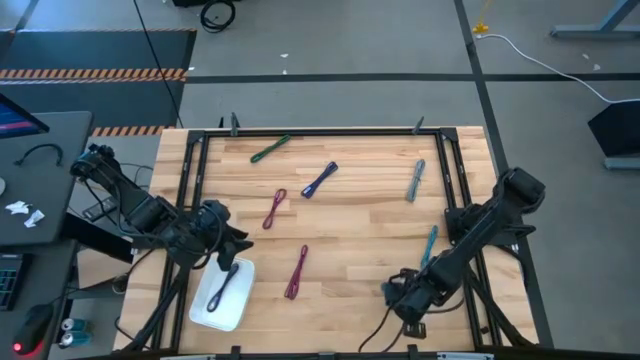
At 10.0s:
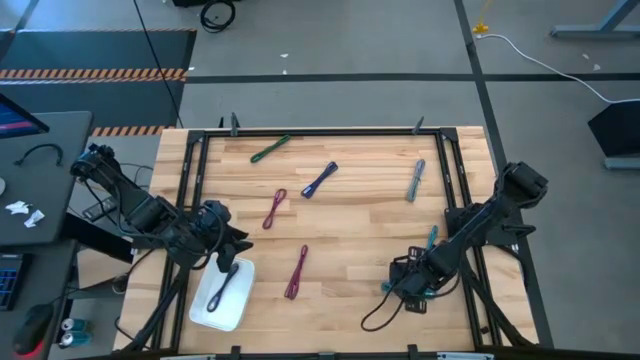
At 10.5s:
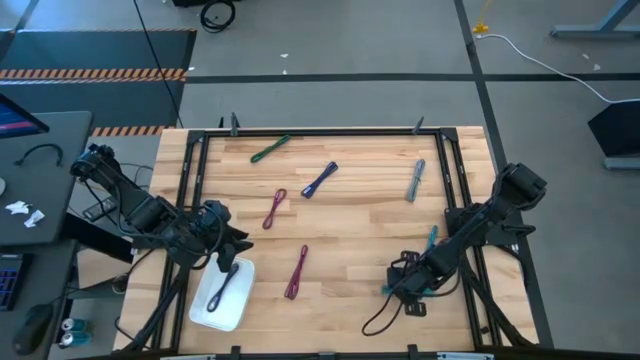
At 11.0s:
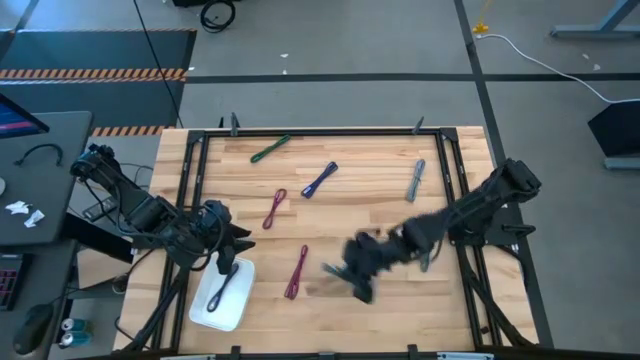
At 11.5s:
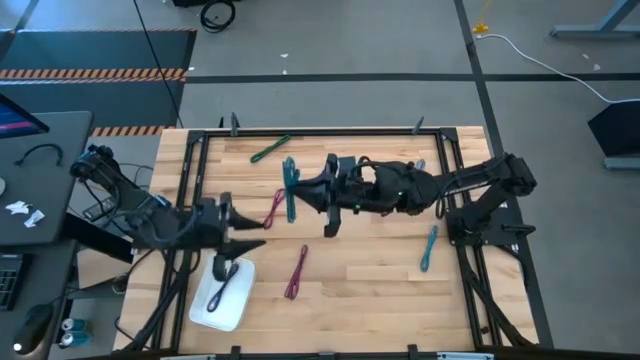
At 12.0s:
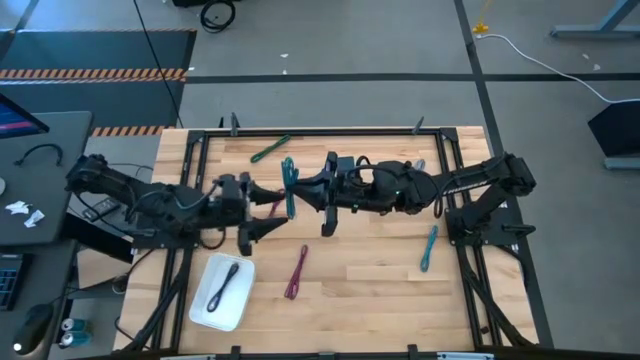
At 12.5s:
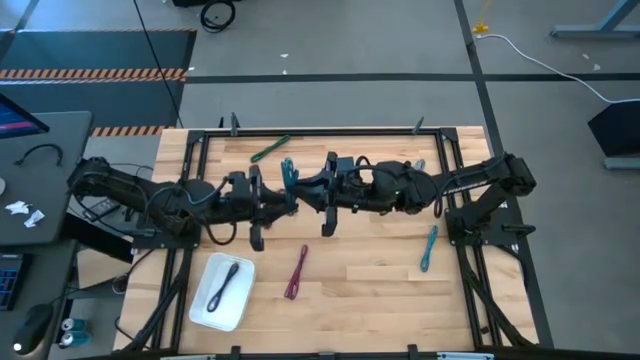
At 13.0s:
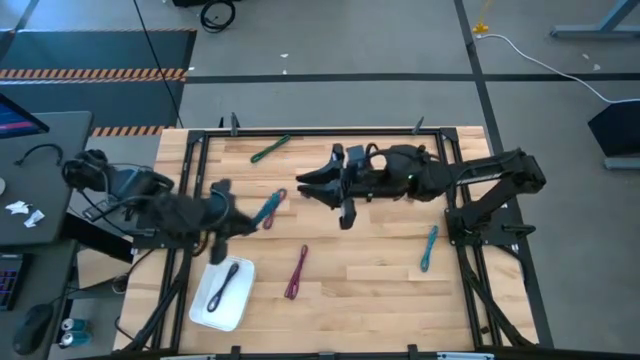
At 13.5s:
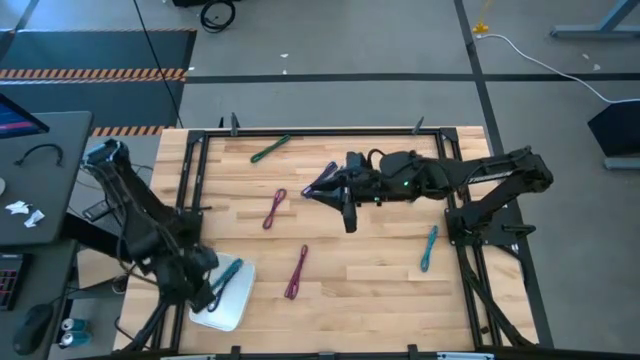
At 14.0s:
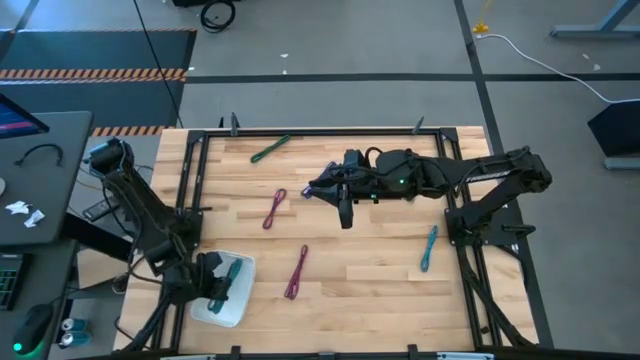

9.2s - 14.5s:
Task: Pick and place USB-C Cables
Put the bottom blue charger cable into the white bin

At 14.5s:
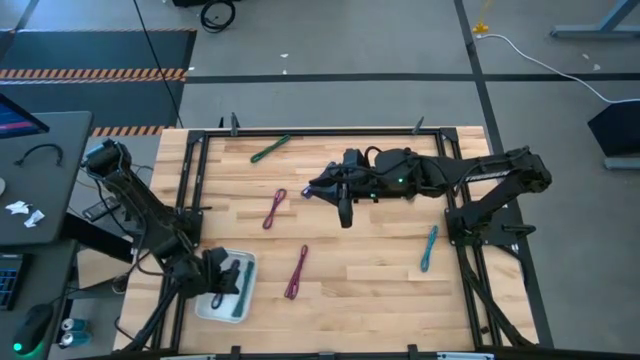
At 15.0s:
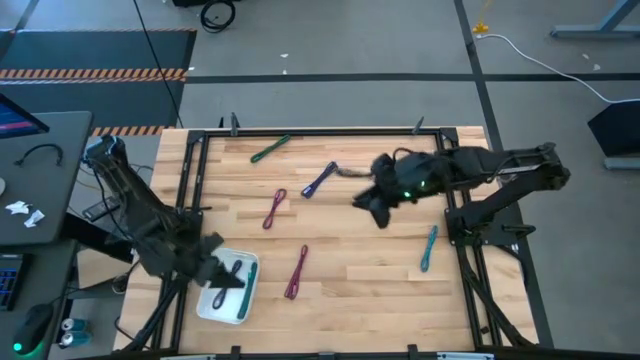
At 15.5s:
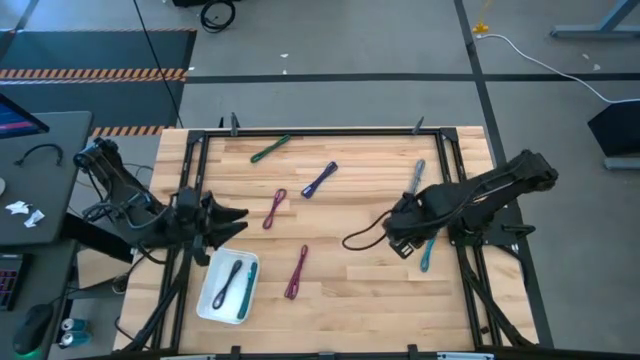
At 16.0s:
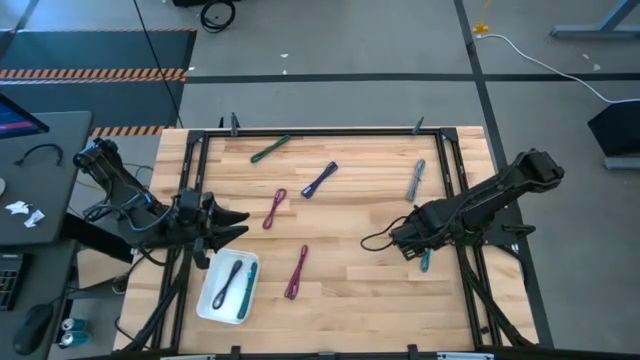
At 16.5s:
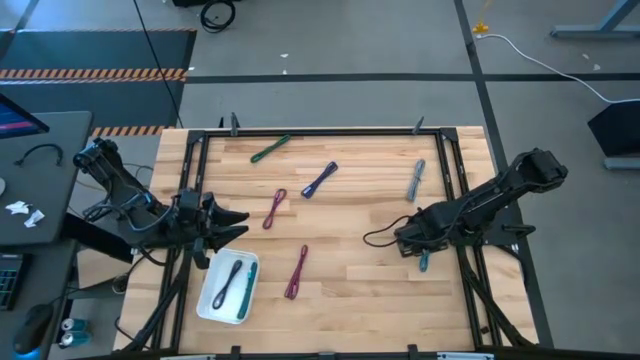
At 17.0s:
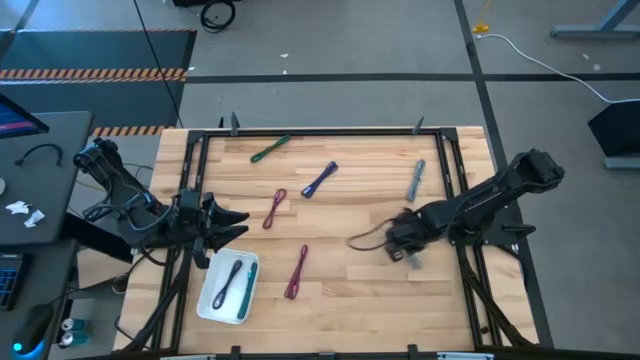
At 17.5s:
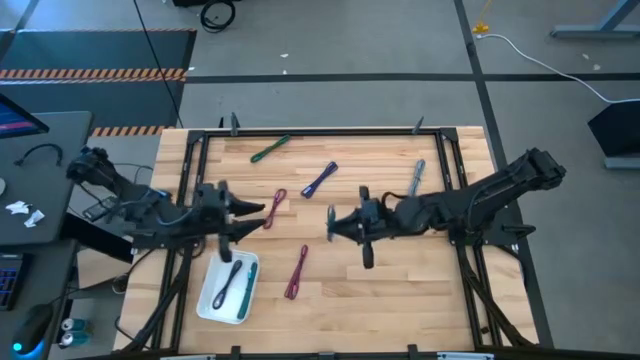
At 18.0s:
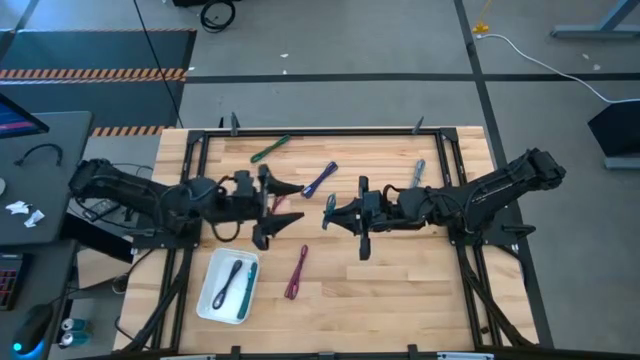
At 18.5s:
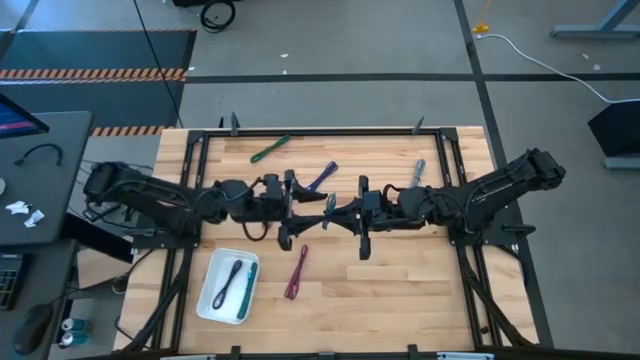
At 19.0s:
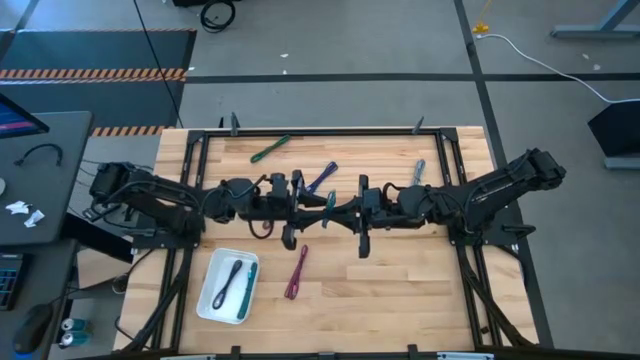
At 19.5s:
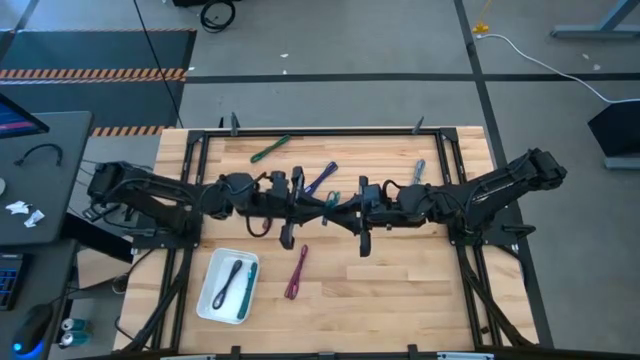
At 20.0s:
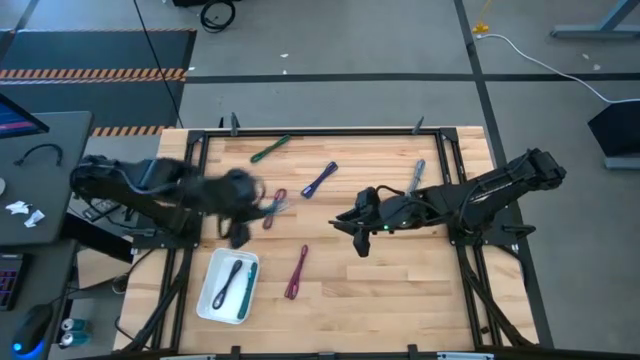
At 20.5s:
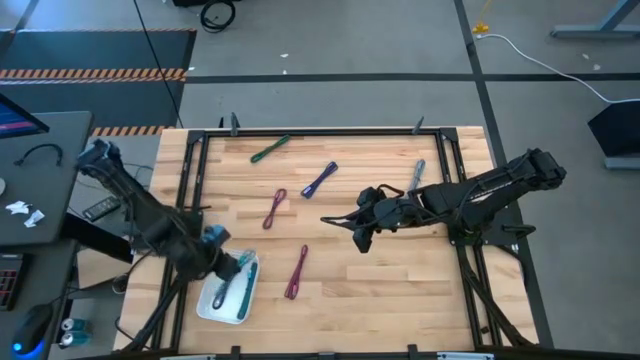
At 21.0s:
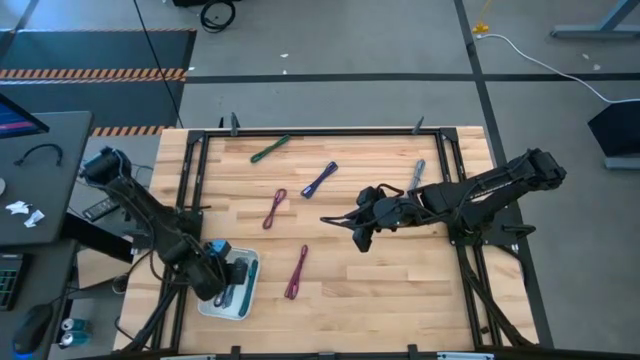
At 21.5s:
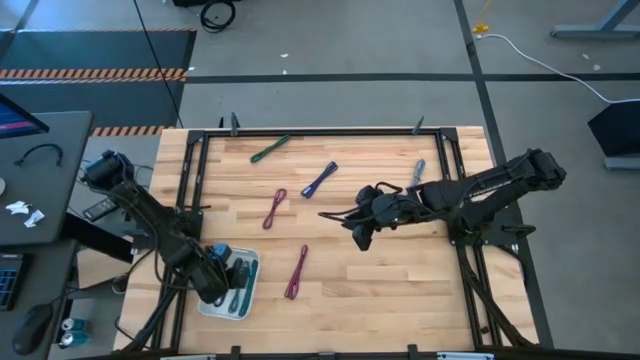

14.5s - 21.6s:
Put the blue charger cable into the white bin

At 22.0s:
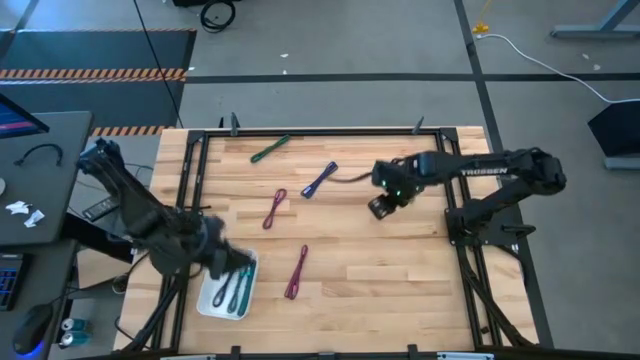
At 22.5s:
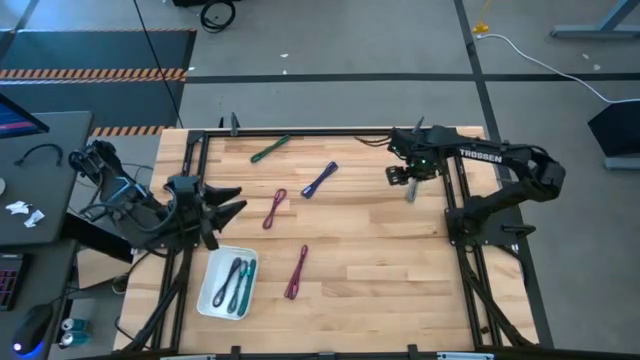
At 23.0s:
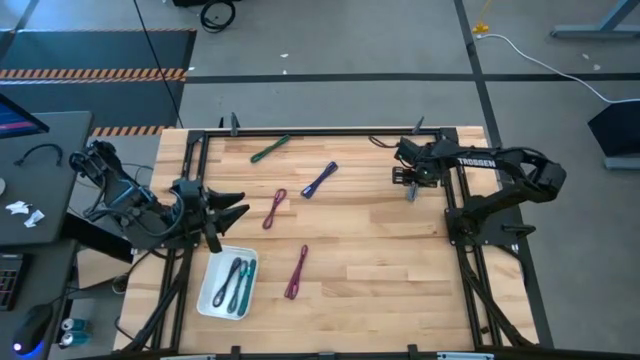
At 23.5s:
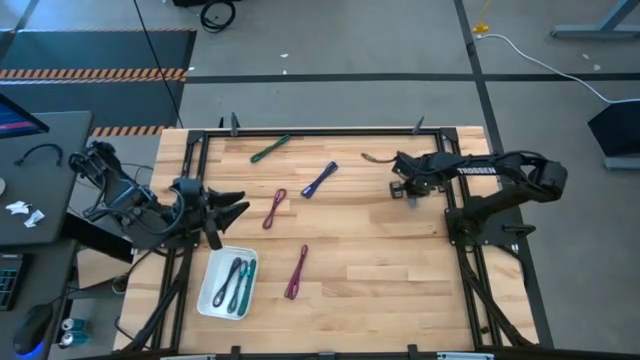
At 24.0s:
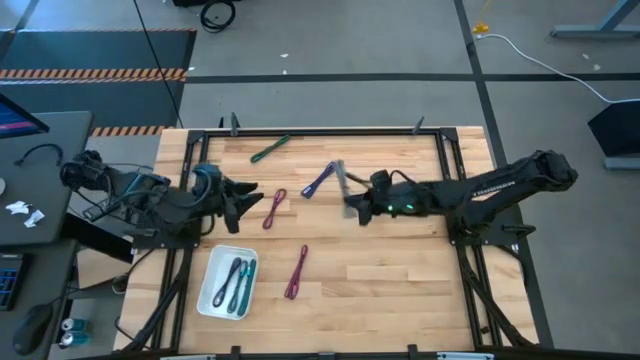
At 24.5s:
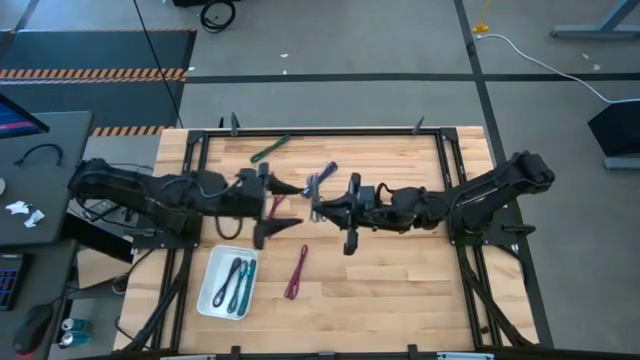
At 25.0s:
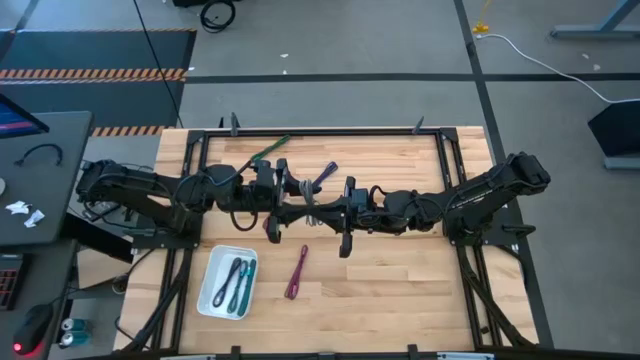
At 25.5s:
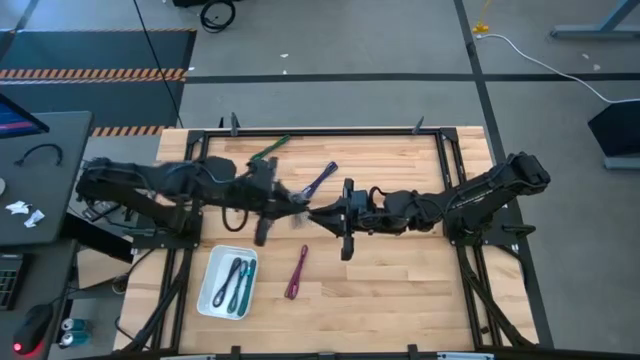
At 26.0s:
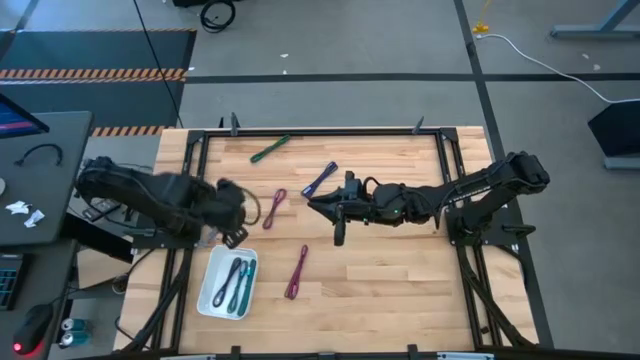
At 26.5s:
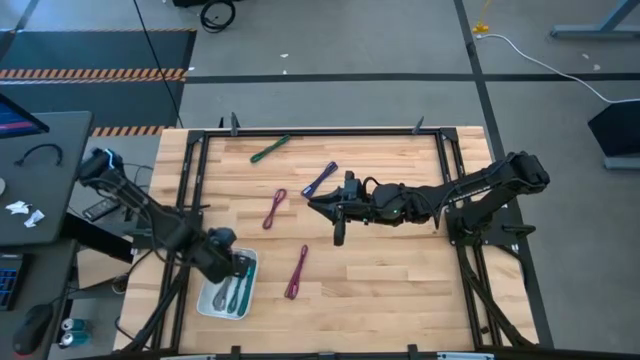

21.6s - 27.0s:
Put the white charger cable into the white bin

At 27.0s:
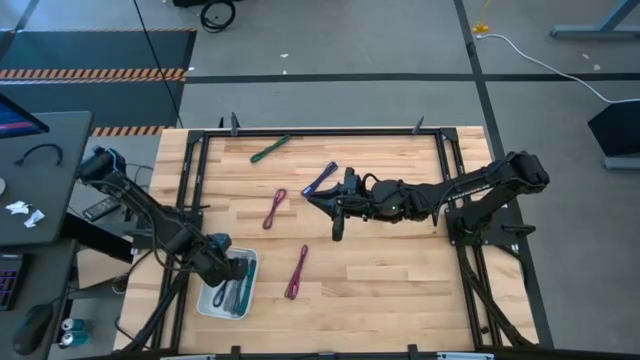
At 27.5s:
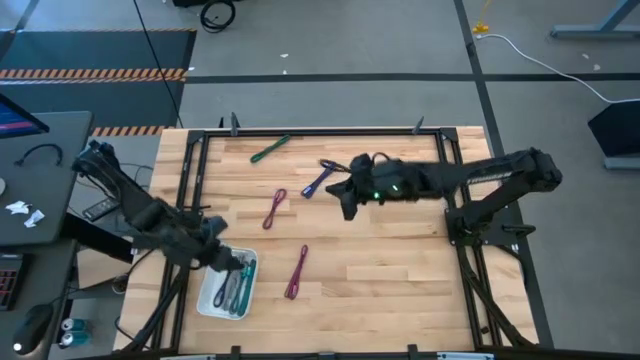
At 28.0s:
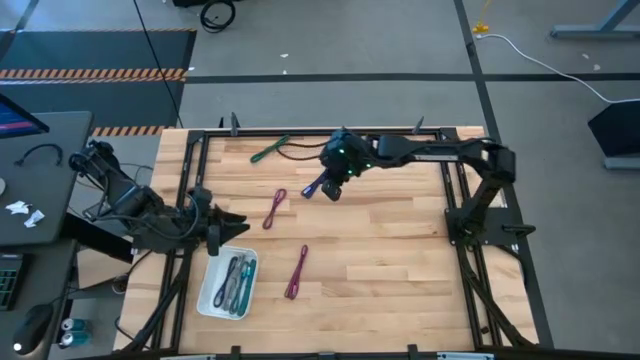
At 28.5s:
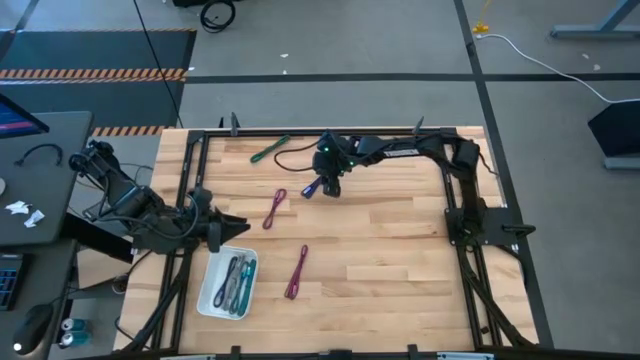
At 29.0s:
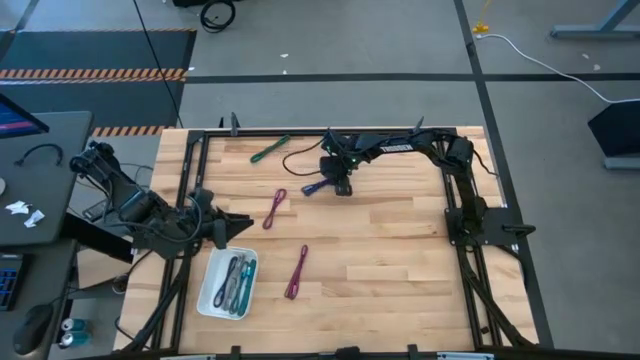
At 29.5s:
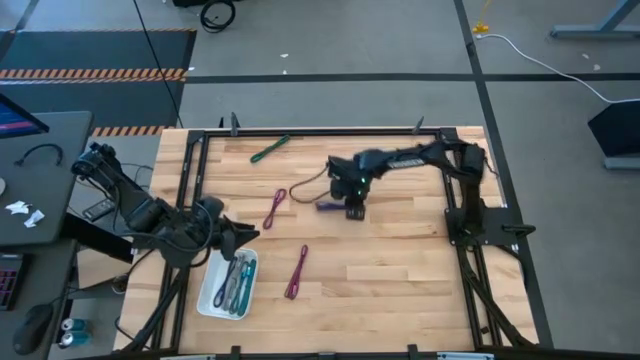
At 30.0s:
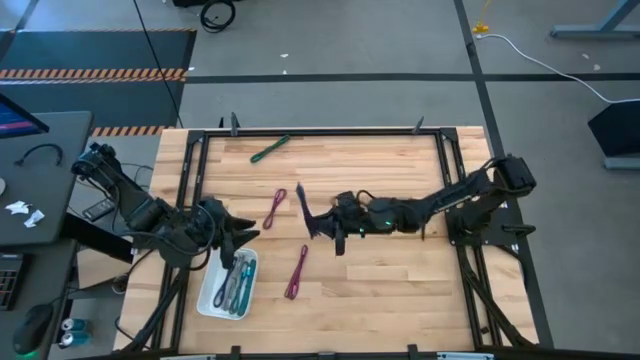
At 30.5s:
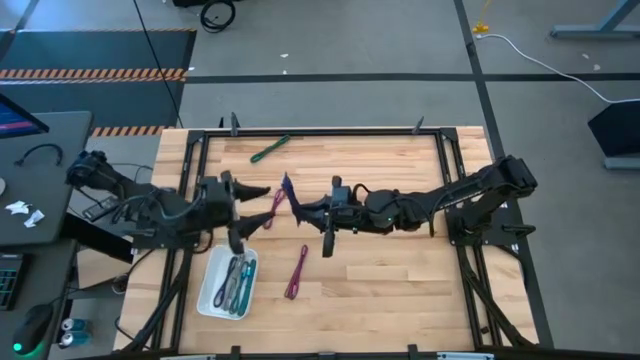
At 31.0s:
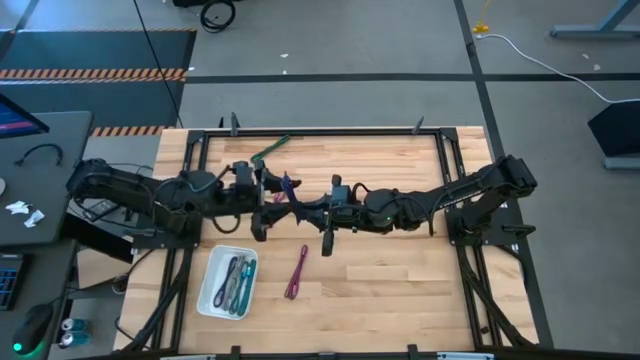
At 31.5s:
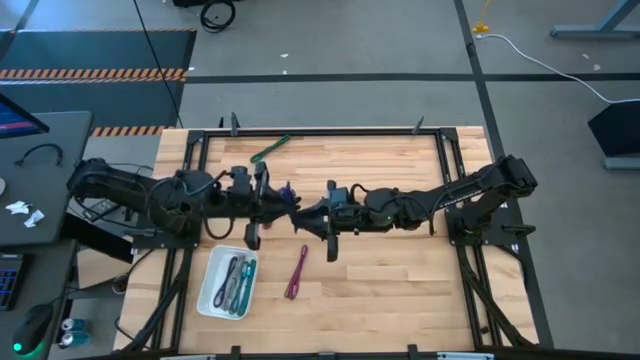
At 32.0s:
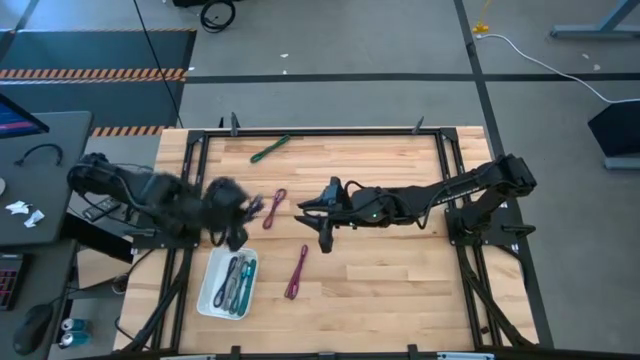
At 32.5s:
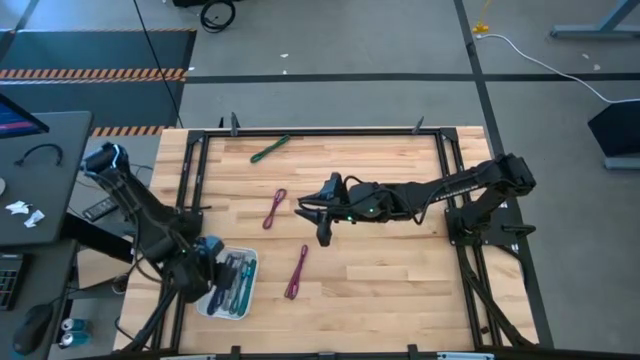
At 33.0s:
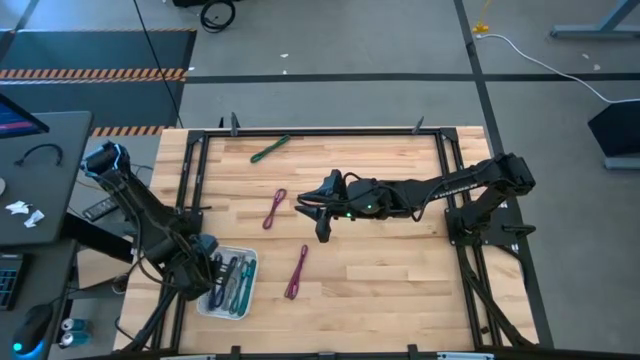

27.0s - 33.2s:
Put the purple charger cable into the white bin
